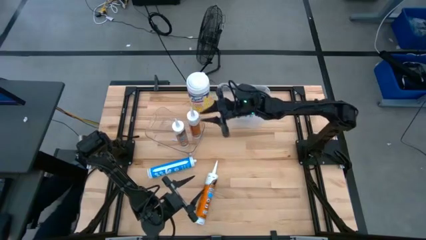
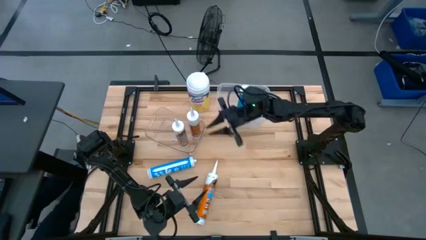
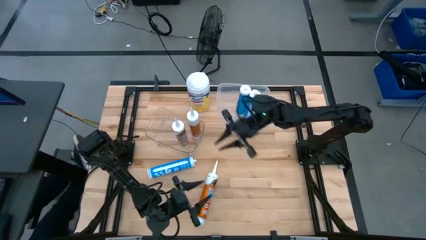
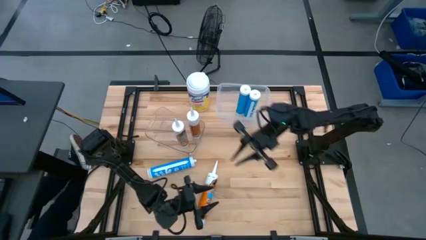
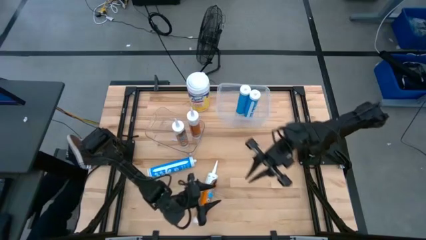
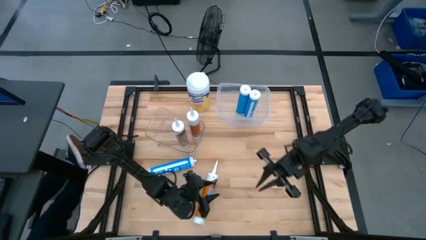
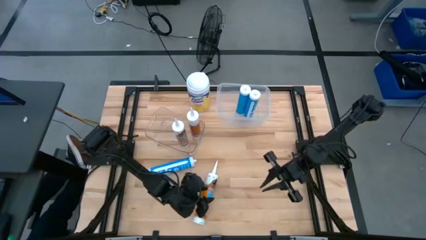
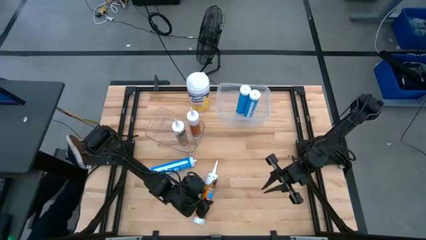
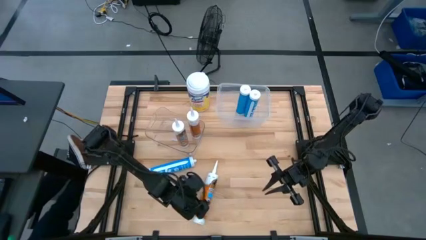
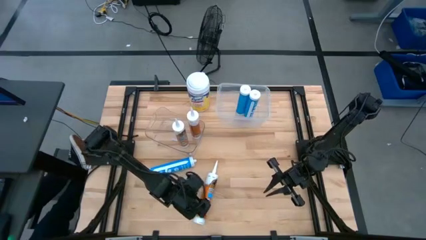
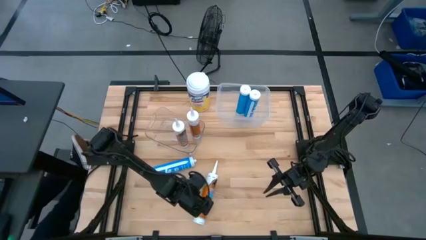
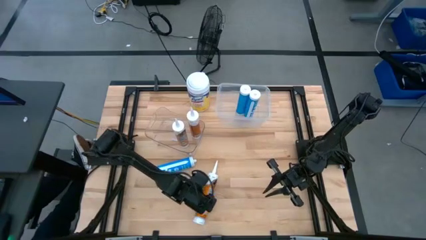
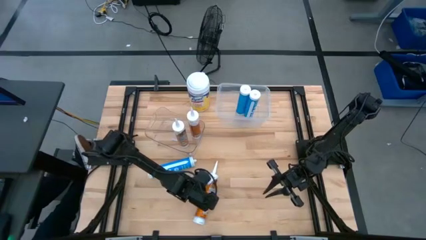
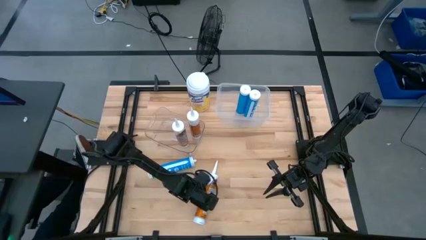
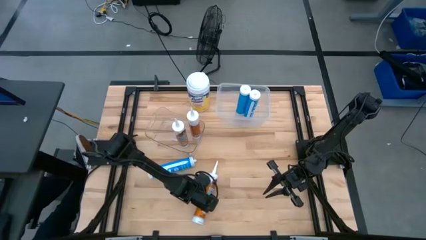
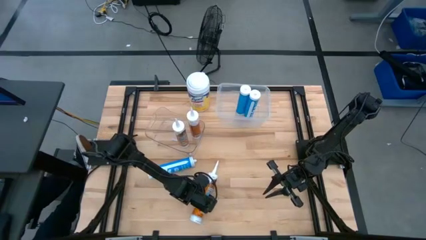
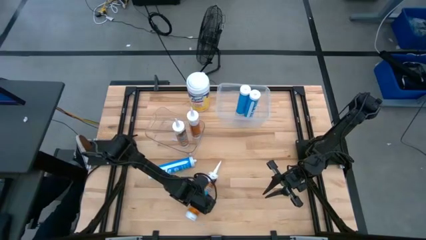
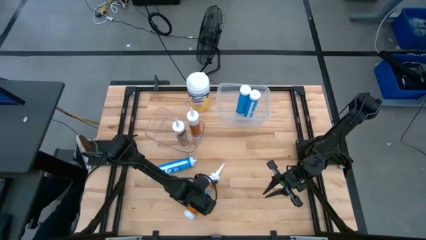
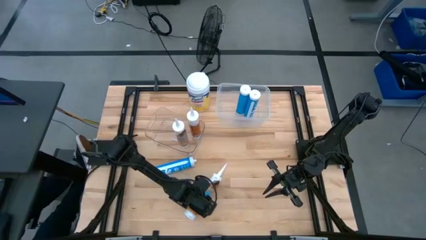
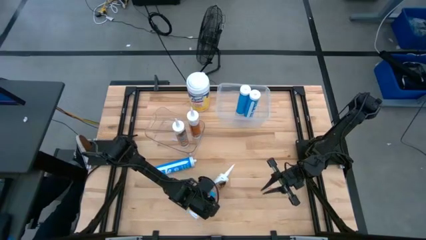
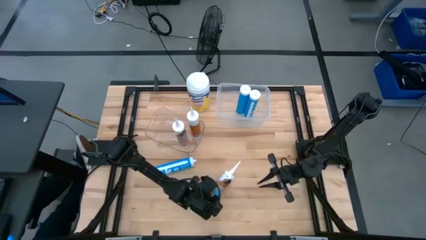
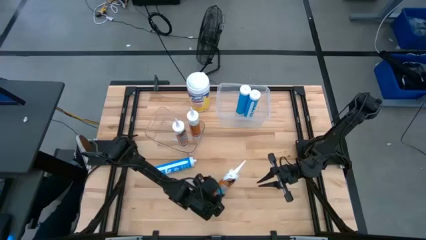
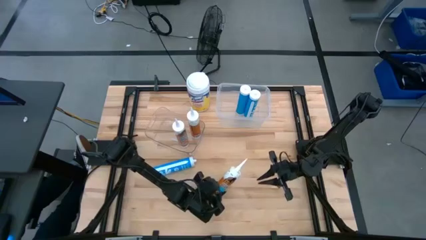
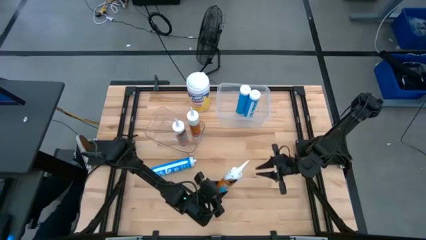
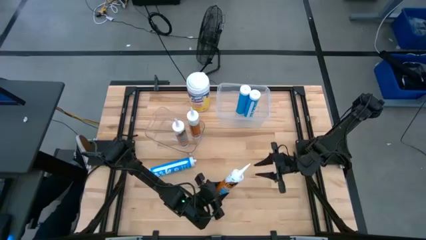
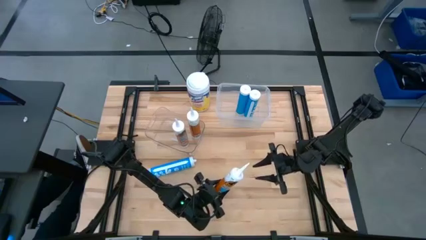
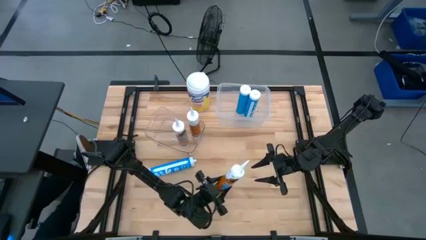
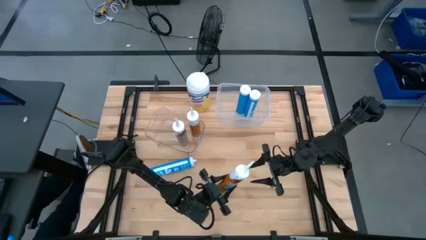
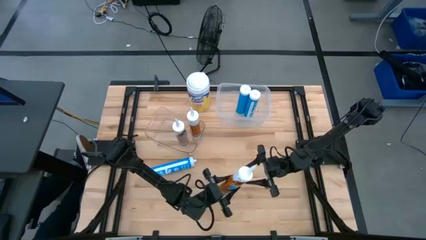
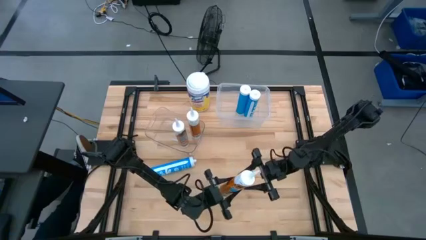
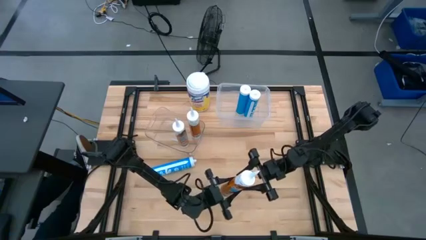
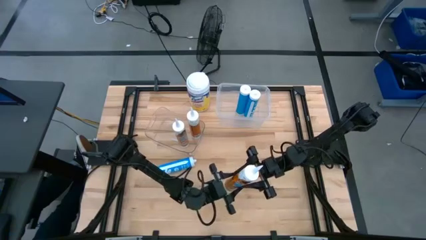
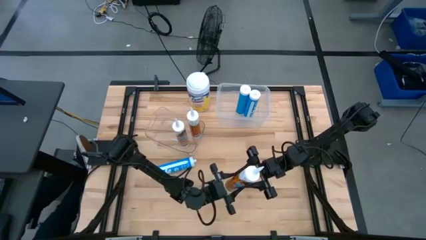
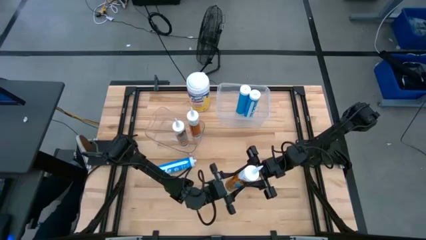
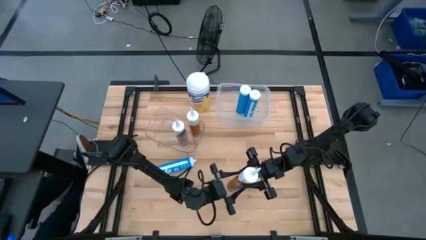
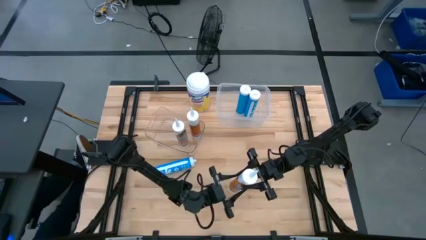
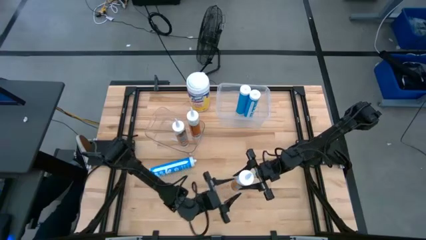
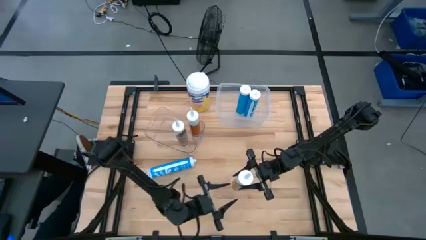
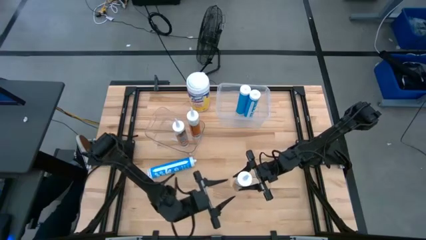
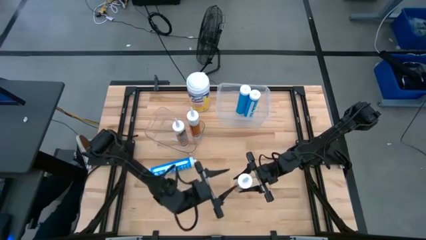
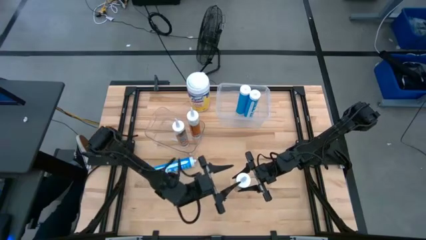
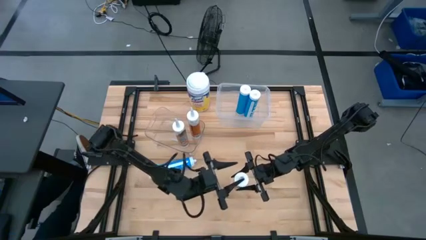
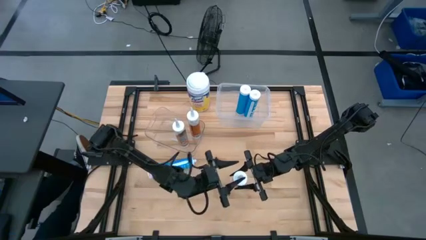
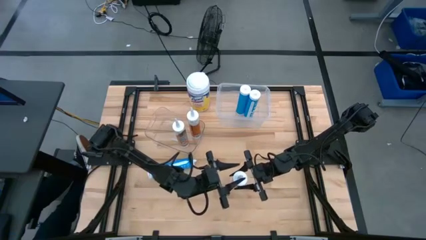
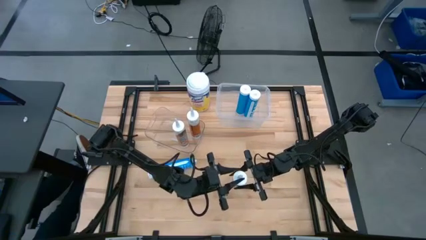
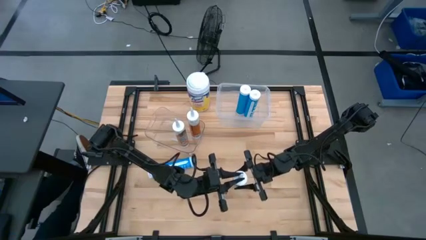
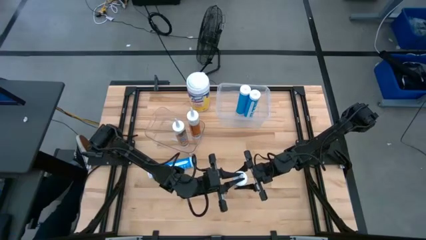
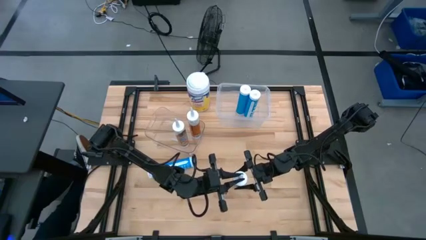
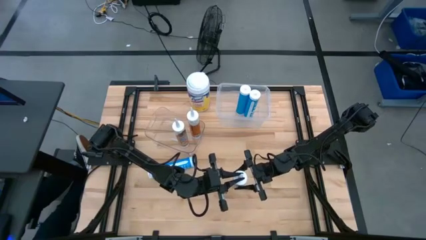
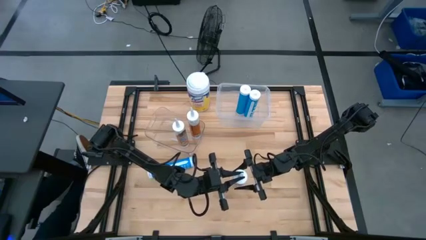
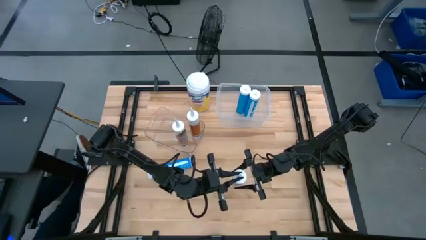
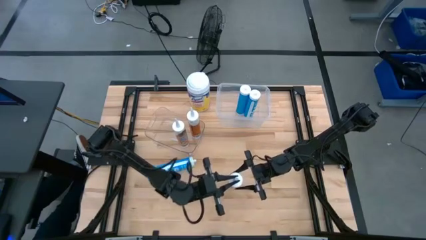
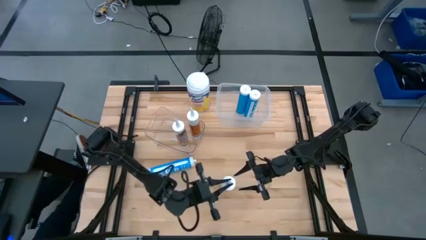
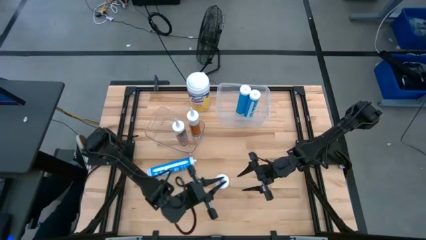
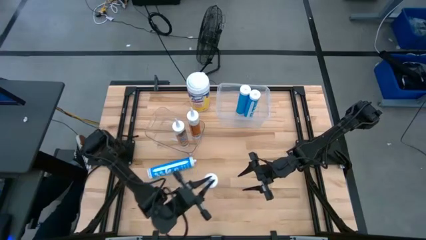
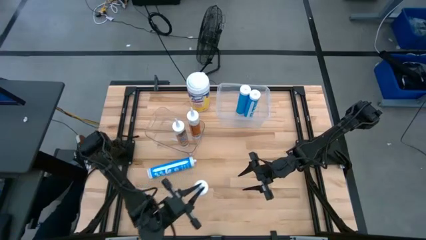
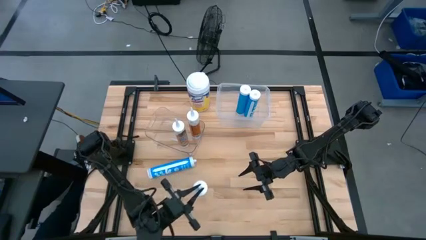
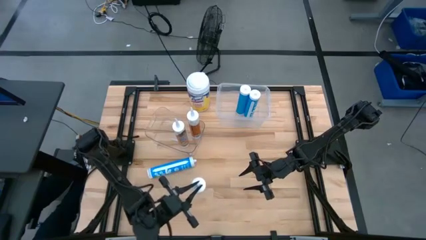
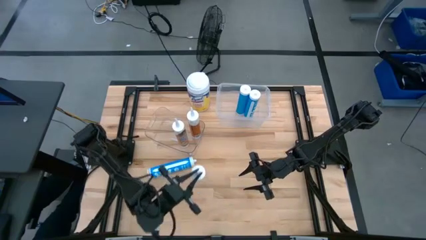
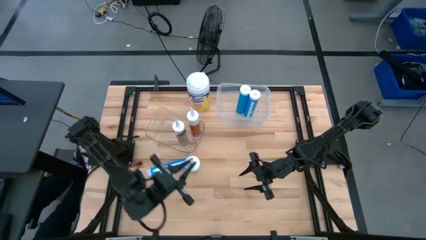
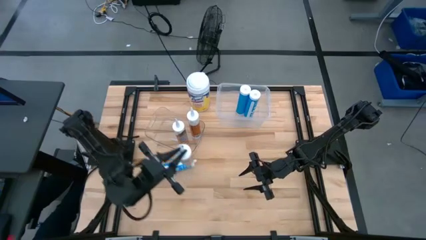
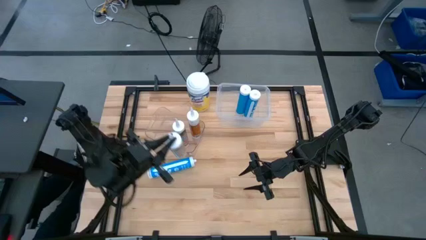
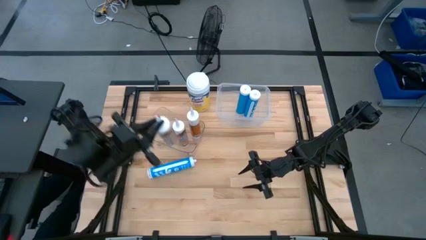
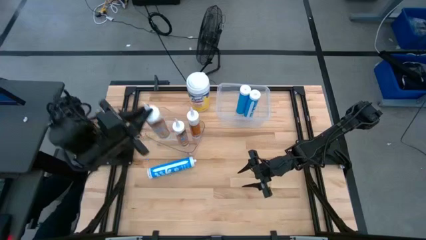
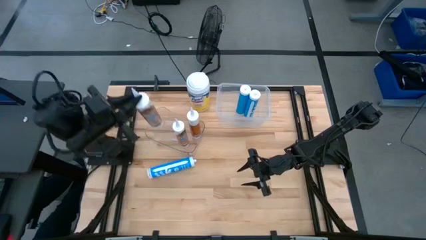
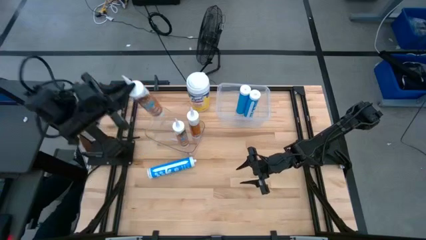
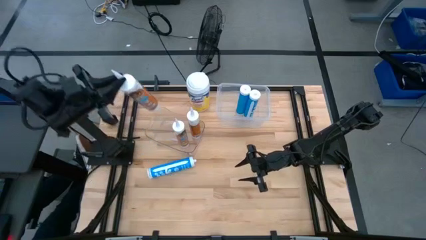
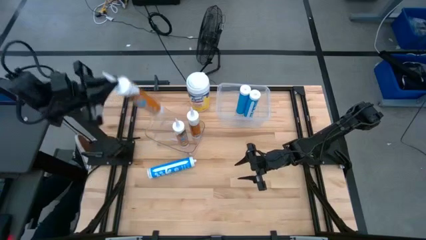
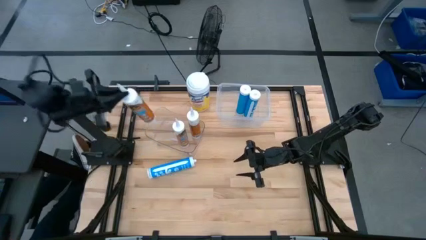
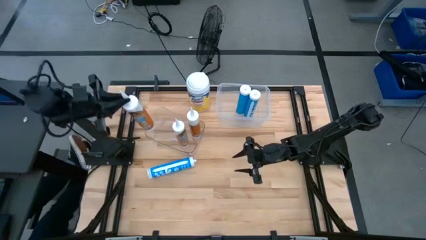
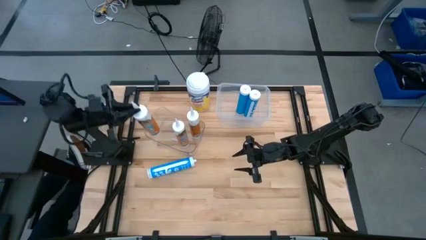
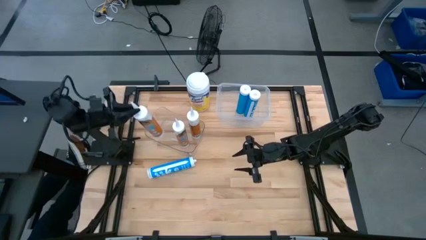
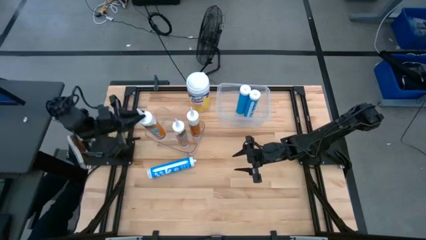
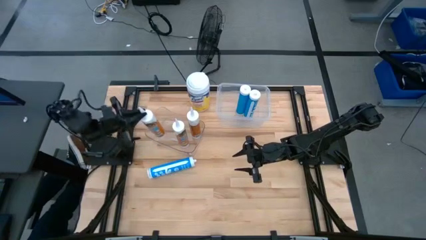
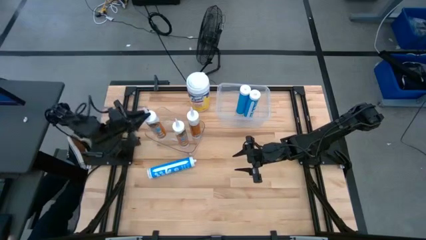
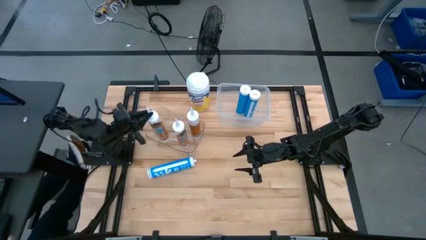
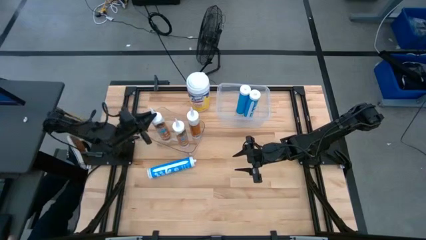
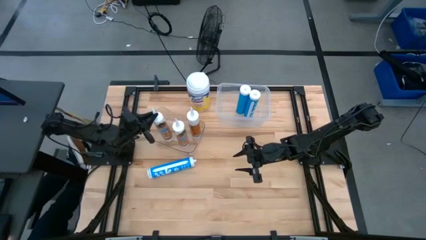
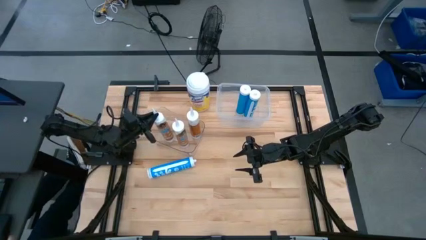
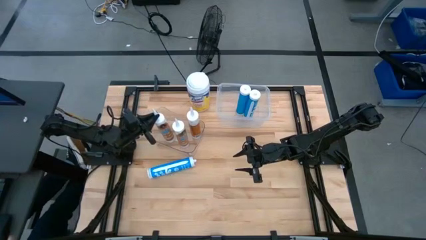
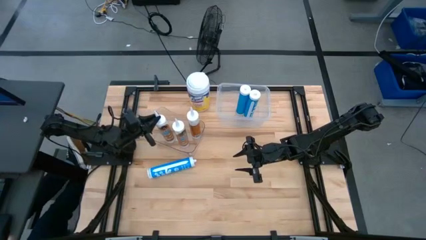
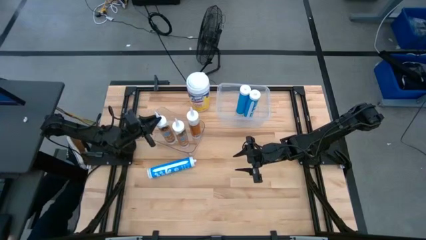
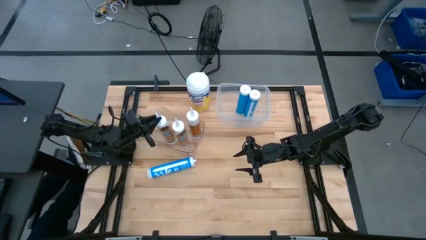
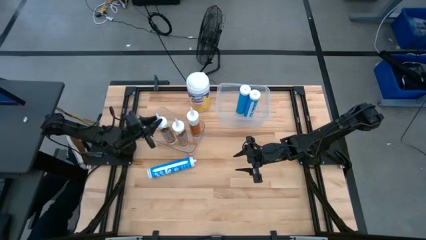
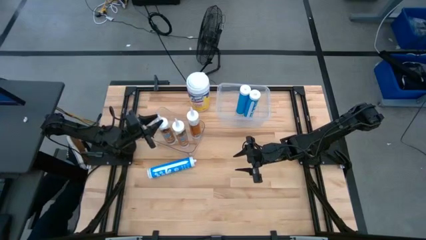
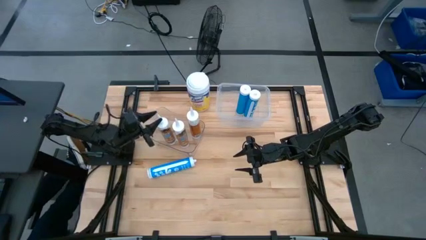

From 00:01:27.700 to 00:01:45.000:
Task: Pick & place silicon tubes, Sealant and Lysol wipes
Put the orange sealant into the left transparent bin
